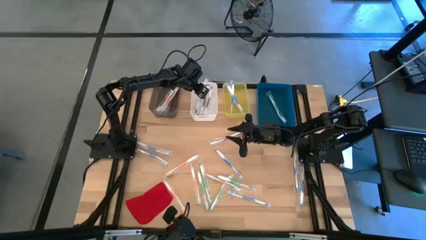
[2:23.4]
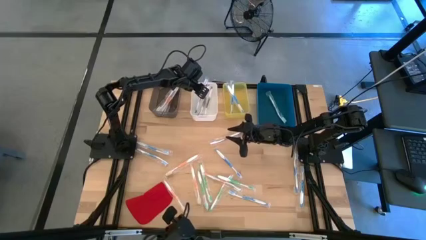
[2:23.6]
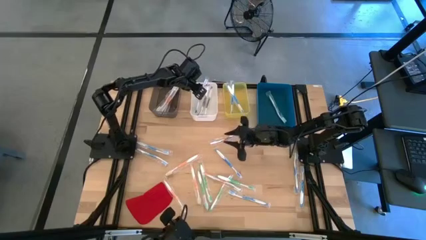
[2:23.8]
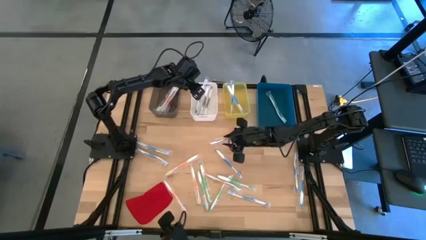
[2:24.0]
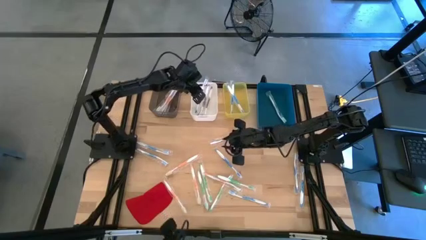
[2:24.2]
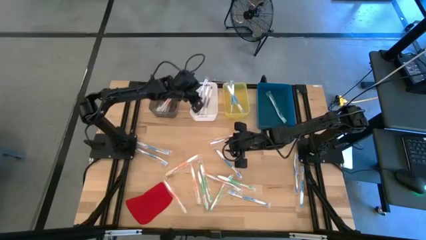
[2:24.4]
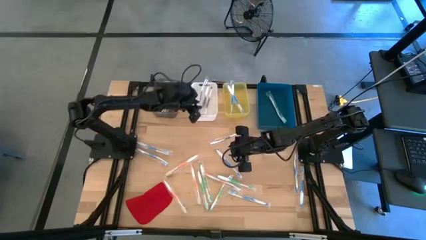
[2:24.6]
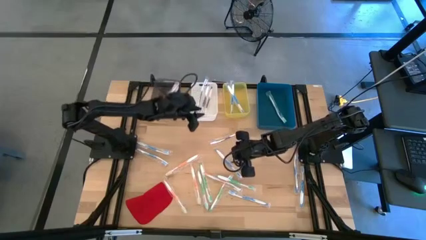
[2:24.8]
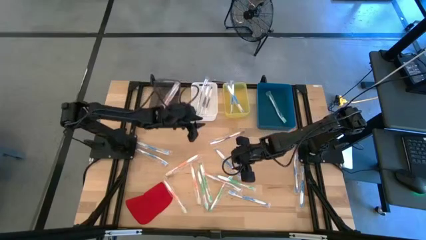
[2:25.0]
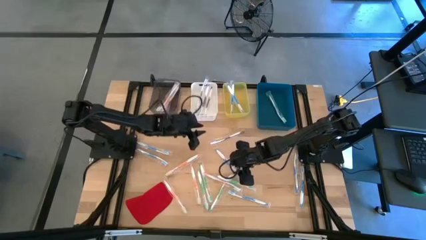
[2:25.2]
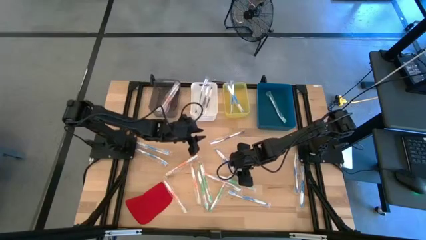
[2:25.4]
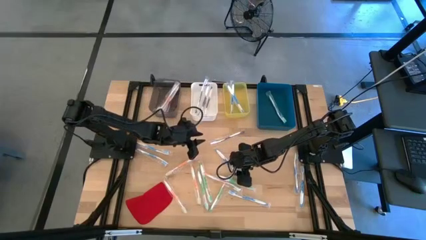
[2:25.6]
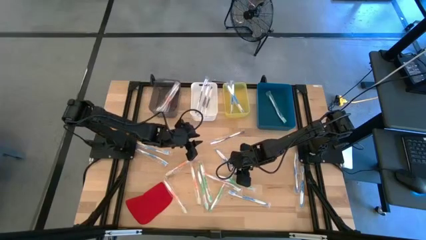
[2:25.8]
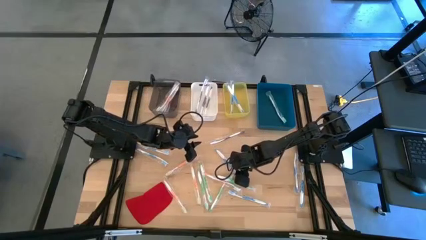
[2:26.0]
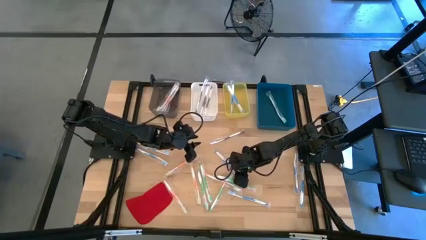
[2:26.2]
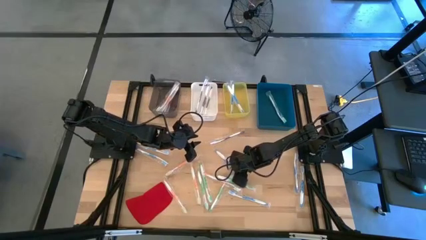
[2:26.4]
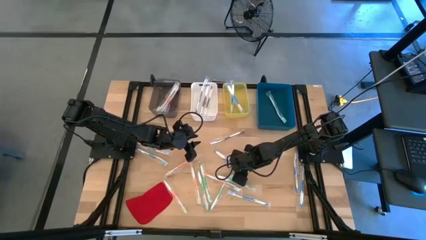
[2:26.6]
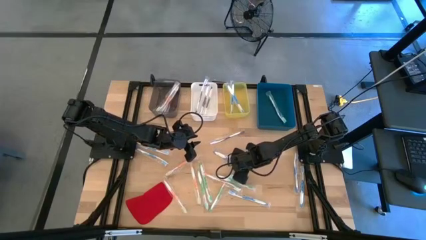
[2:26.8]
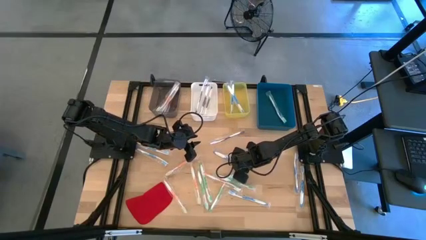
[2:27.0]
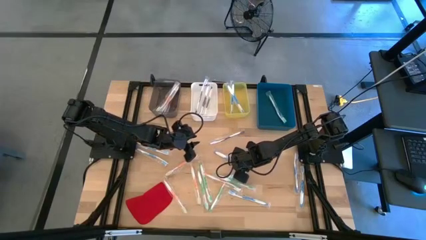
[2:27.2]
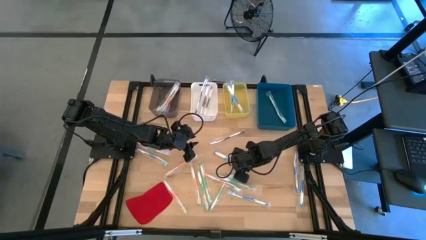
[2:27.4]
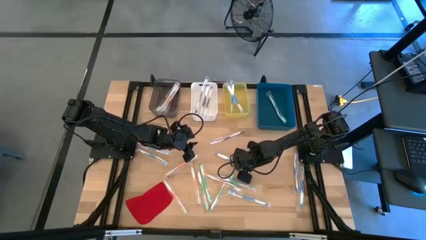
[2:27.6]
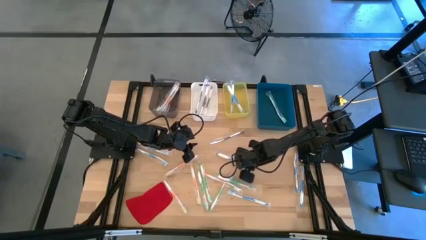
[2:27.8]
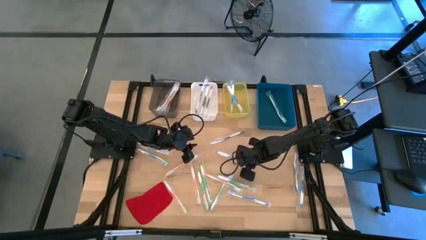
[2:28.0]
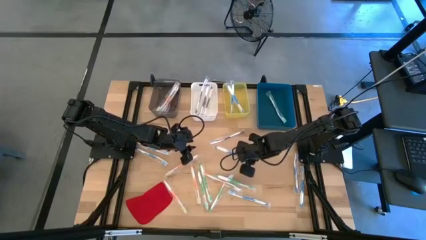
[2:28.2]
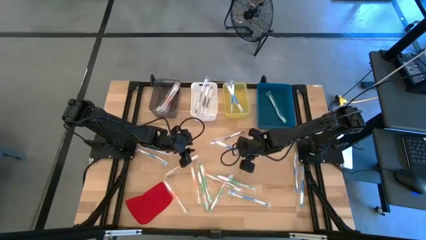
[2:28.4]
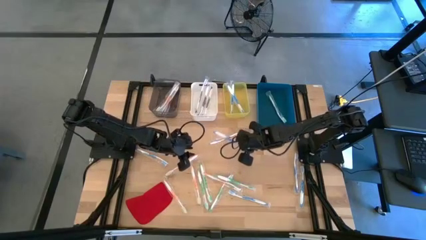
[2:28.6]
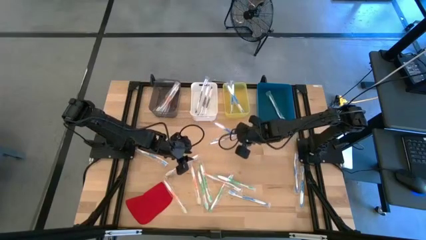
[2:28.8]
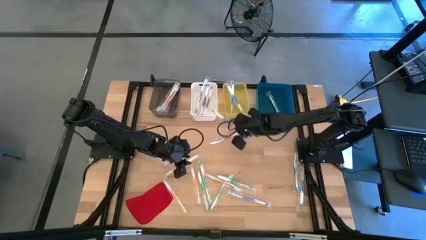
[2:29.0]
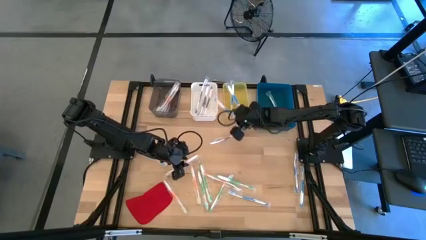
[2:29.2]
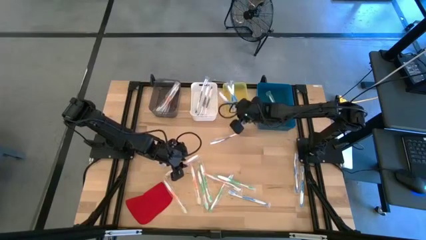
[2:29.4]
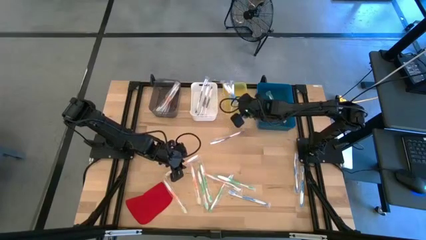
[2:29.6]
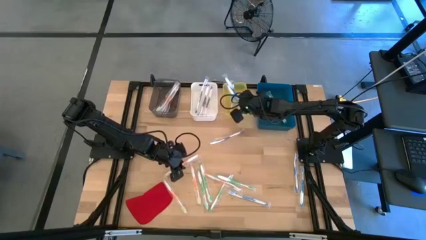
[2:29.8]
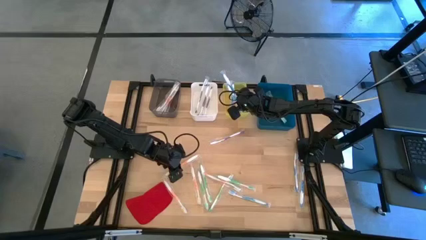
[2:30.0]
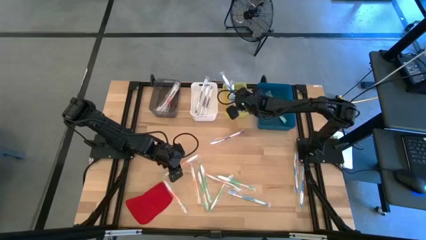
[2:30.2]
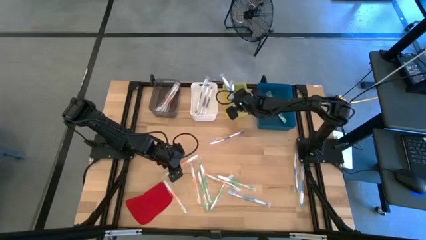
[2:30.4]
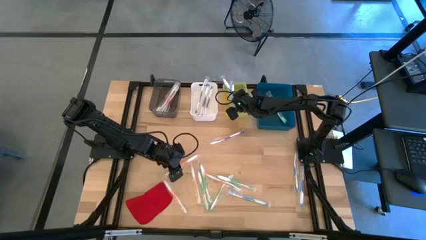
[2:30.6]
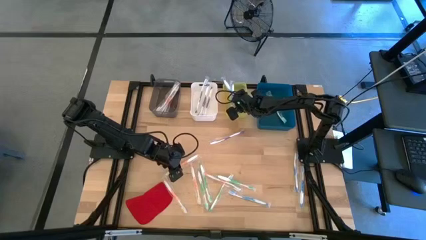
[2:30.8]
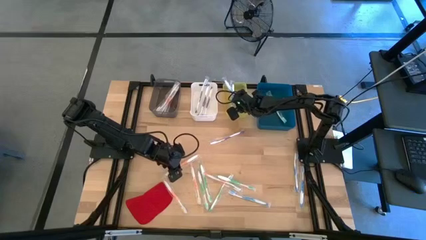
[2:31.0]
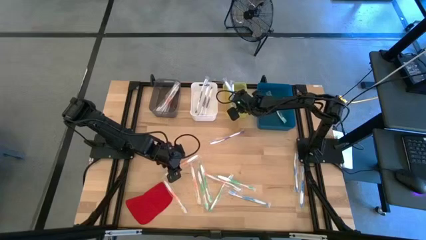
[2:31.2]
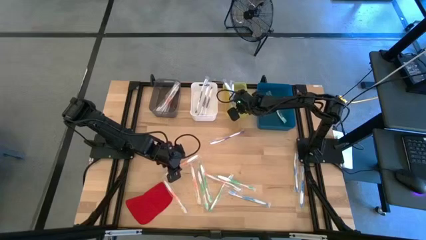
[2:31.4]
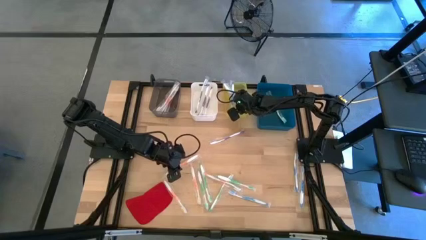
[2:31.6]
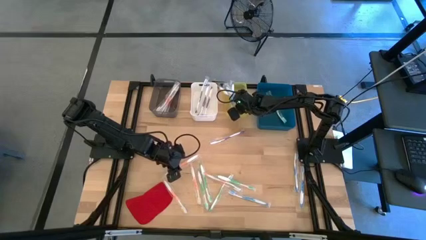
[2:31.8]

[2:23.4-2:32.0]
Task: Pick & Place Toothbrushes
Put the blue toothbrush into the yellow bin

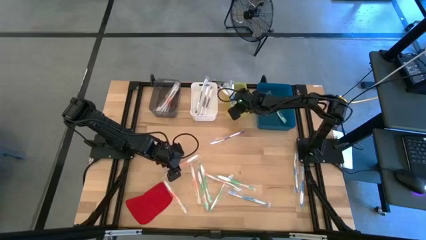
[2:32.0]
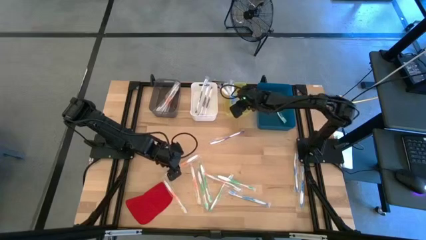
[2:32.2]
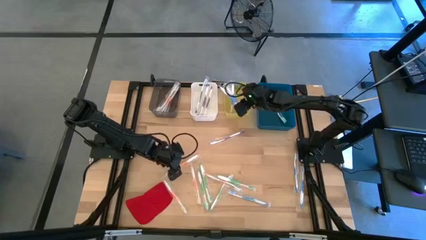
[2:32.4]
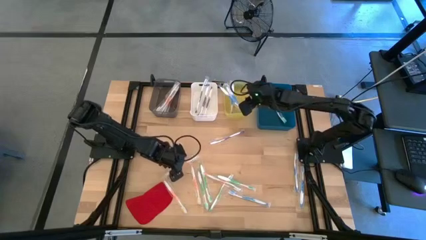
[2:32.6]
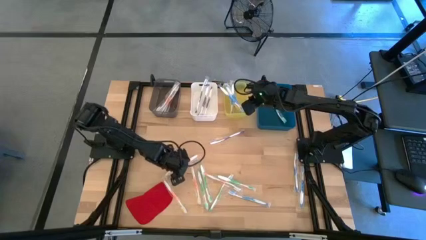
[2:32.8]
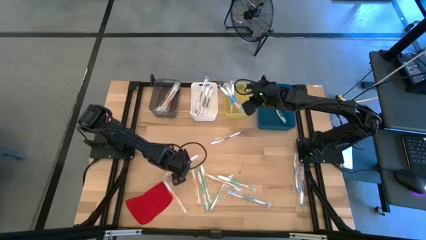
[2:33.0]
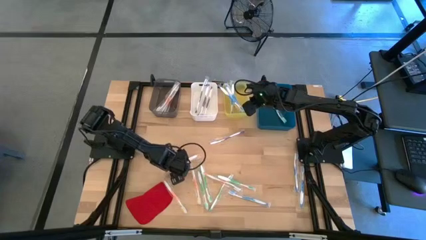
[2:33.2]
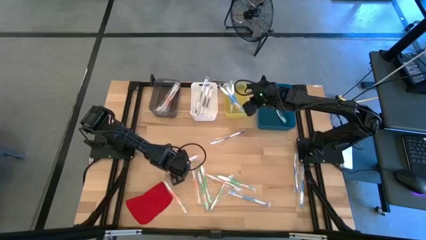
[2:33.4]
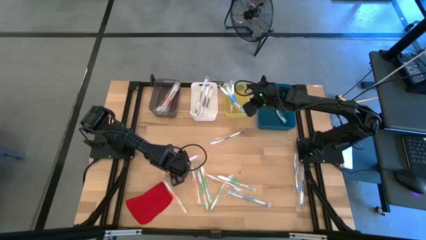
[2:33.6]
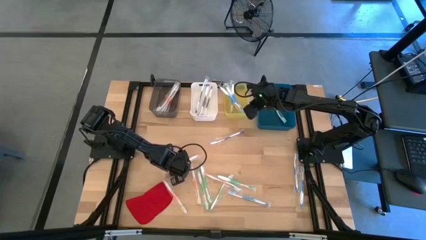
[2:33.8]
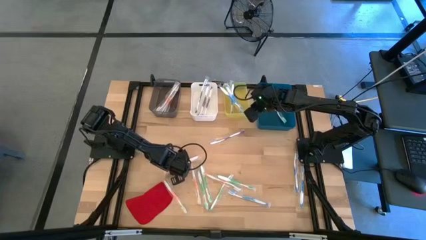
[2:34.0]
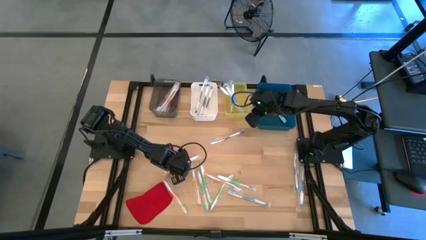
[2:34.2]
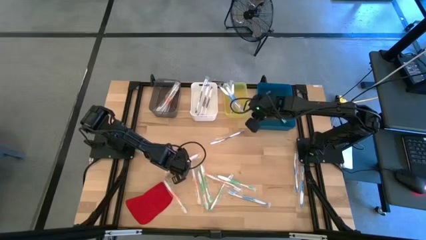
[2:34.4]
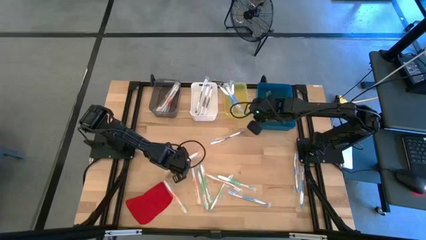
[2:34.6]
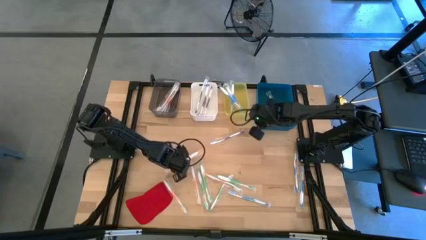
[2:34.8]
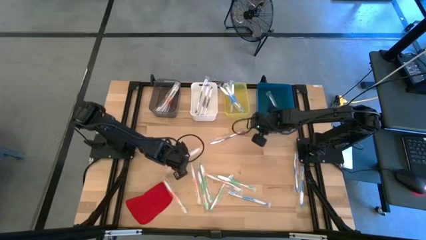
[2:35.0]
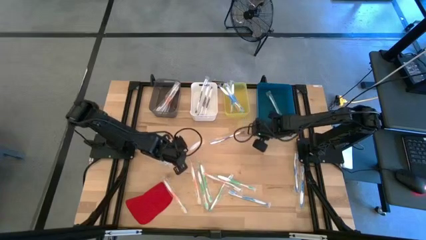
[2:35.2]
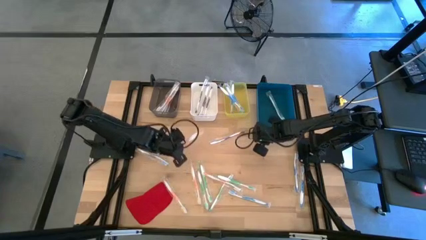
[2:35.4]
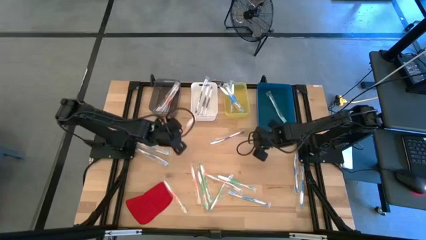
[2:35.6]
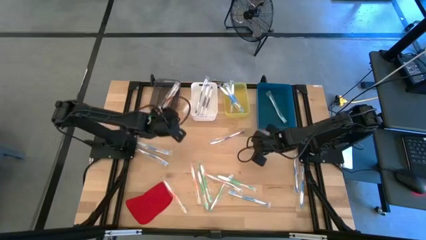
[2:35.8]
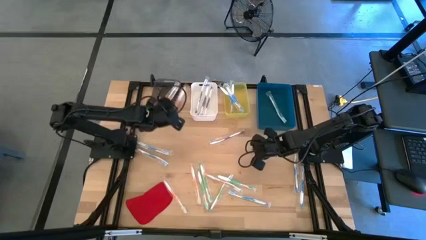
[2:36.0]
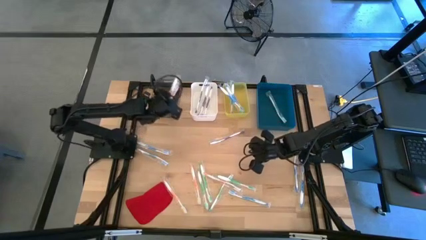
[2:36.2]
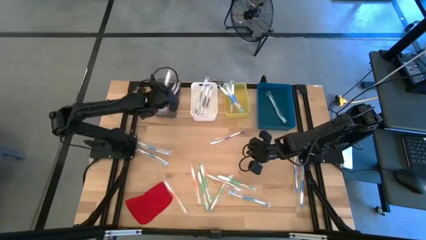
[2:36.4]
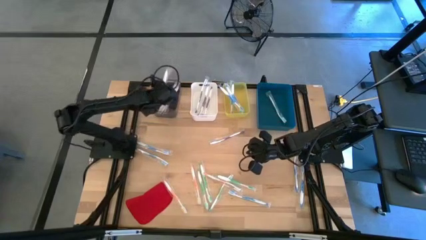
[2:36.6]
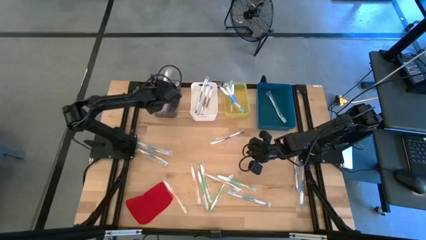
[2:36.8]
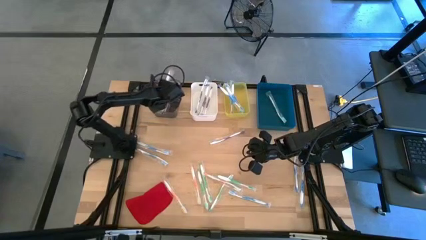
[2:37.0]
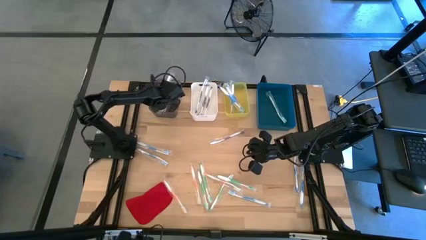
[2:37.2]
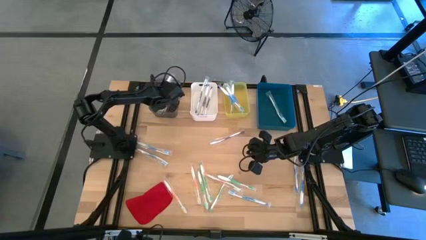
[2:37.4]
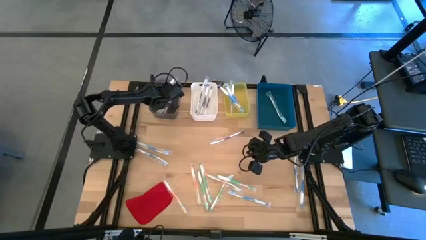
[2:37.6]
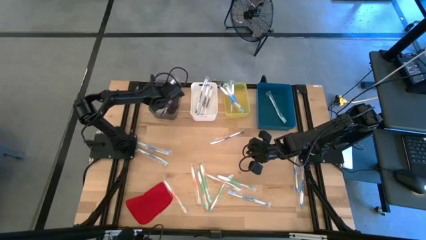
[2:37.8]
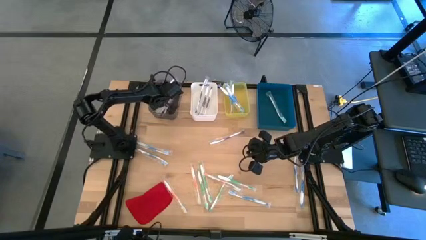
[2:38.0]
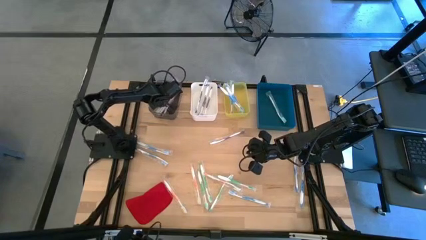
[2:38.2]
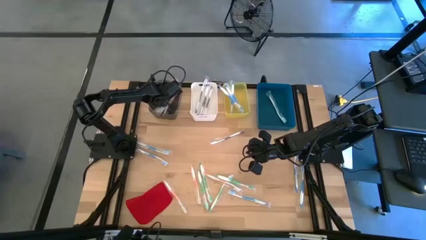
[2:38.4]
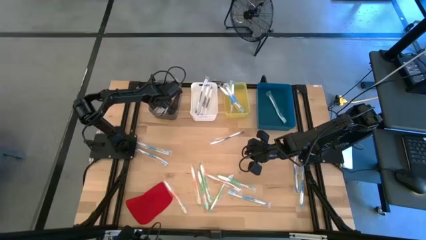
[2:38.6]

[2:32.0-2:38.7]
Put the orange toothbrush into the black bin

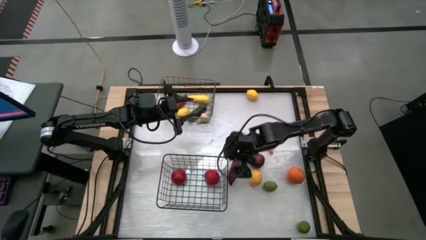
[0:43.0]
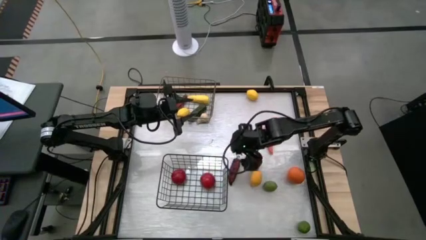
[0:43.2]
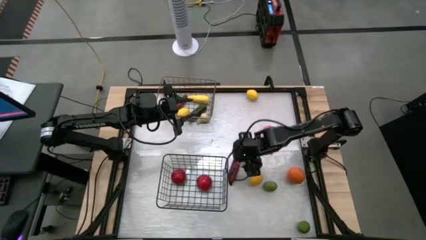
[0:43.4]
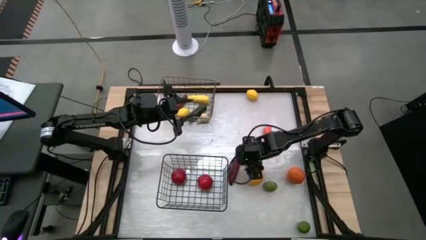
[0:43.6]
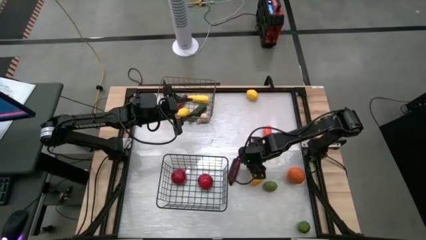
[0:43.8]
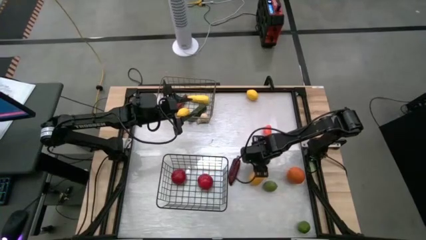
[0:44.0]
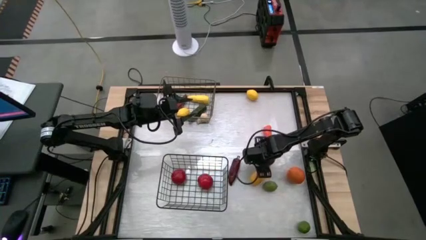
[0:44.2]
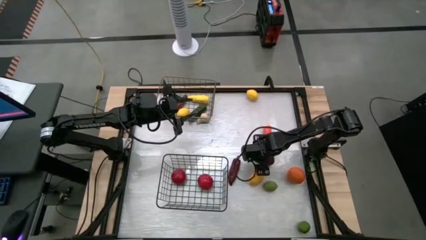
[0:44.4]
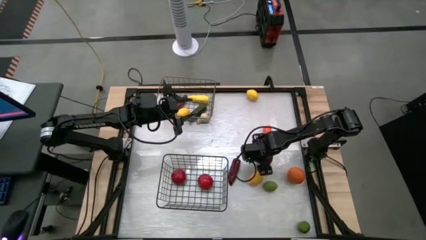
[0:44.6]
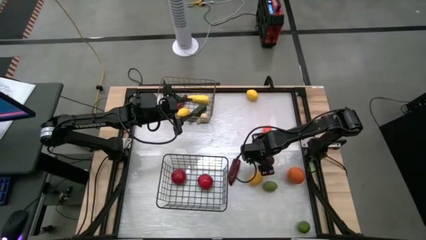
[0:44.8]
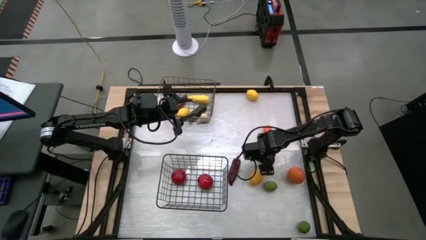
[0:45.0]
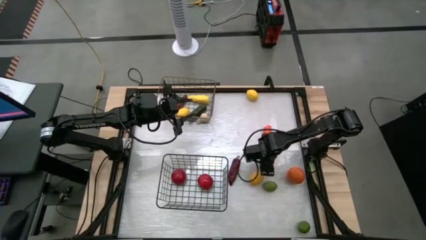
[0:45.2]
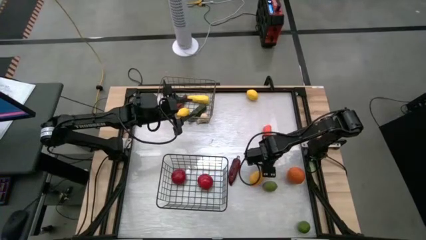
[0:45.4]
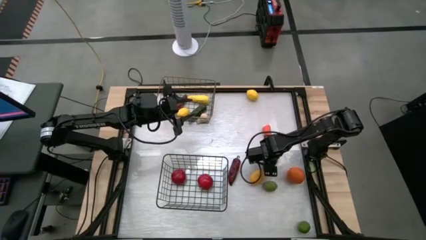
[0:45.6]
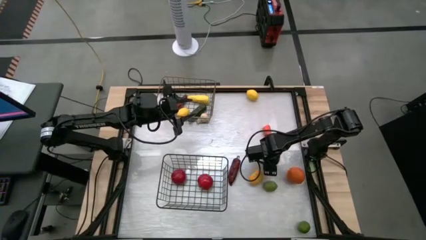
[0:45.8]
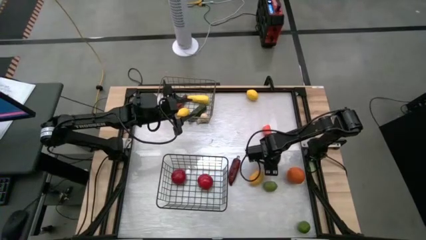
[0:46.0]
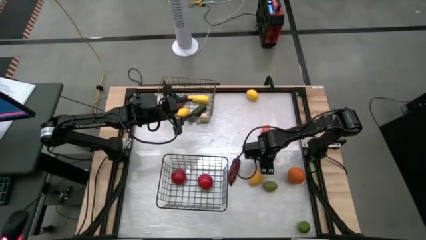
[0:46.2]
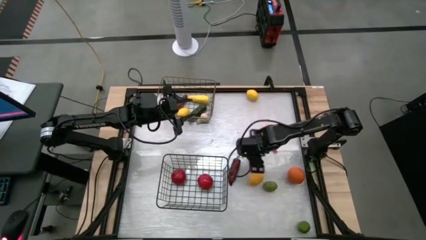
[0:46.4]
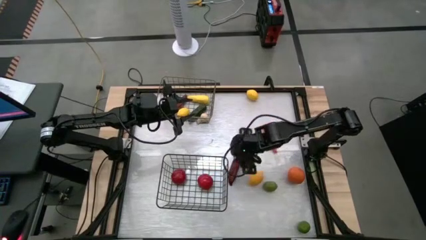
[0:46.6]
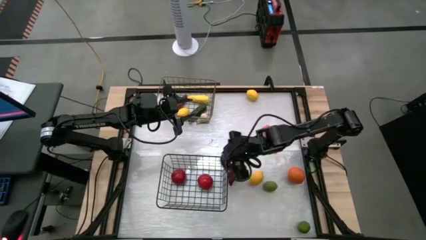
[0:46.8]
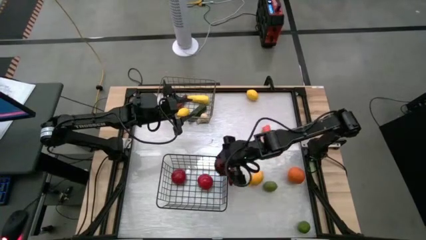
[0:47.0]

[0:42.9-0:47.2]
Task: Sort produce into baskets
Put the dark red apple into the bottom wire basket
